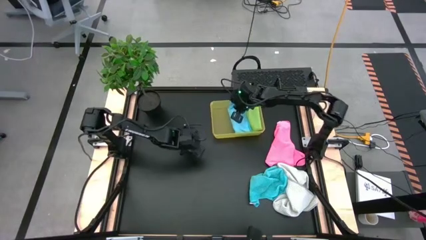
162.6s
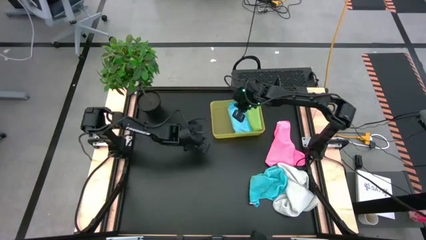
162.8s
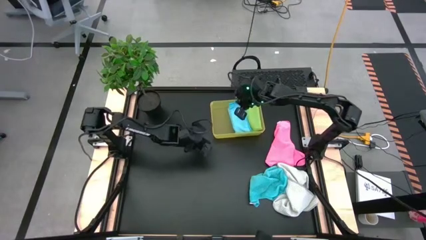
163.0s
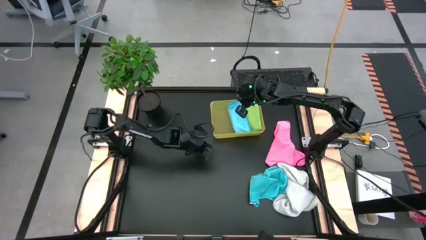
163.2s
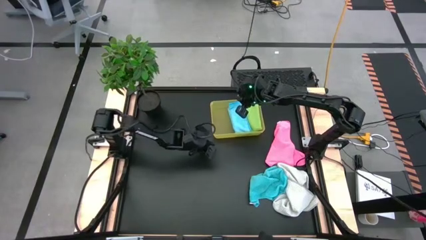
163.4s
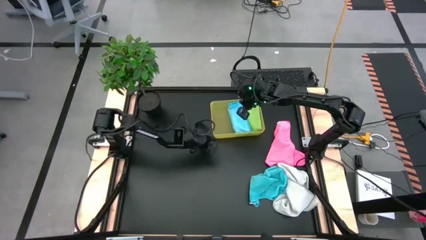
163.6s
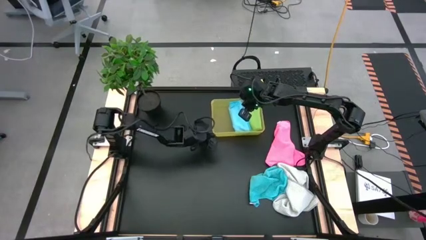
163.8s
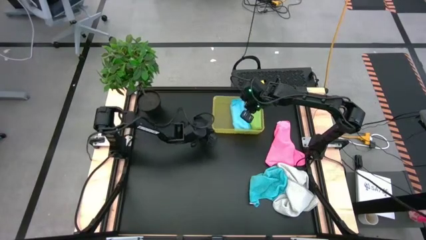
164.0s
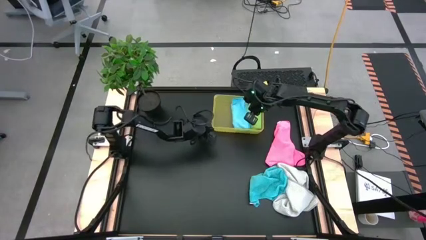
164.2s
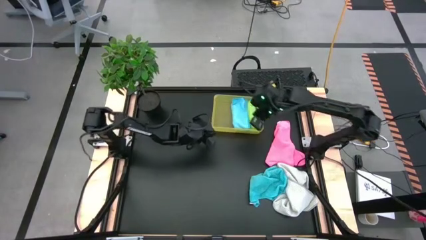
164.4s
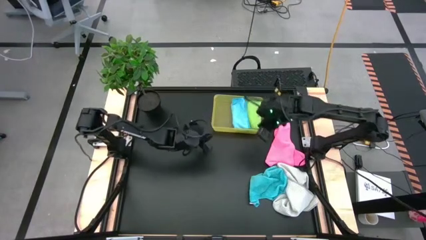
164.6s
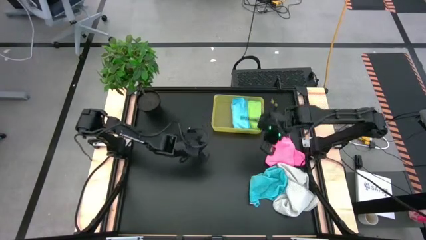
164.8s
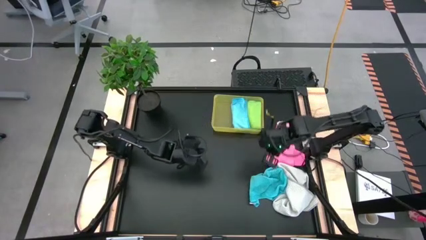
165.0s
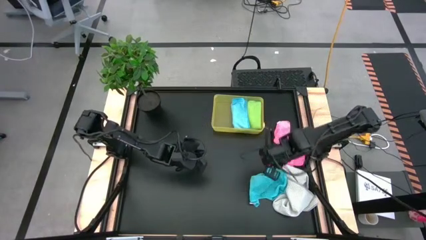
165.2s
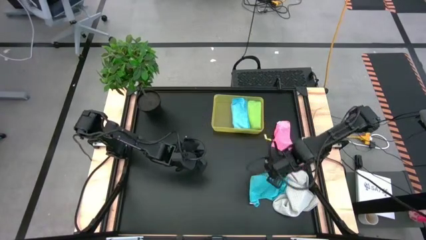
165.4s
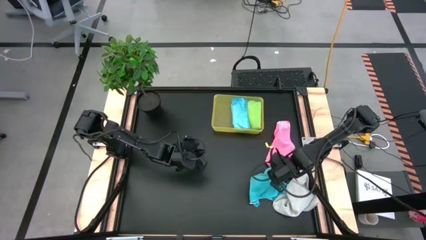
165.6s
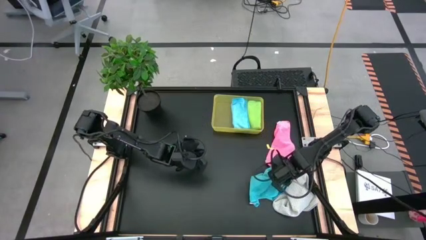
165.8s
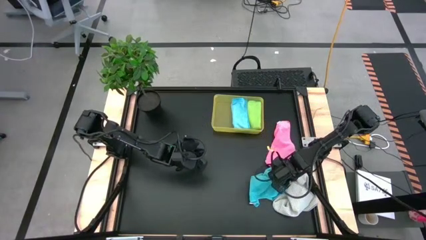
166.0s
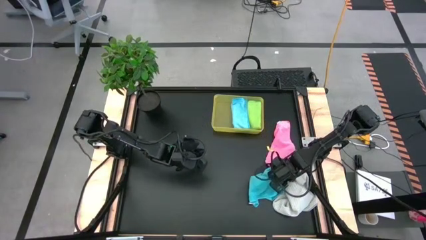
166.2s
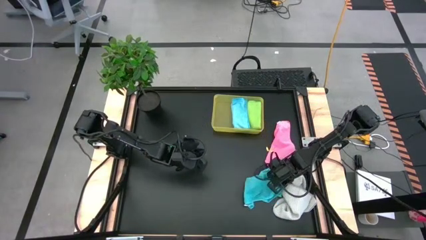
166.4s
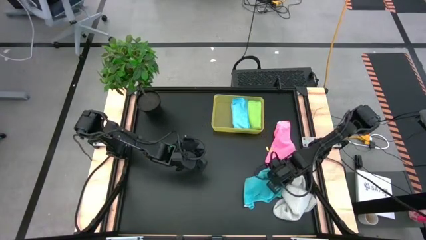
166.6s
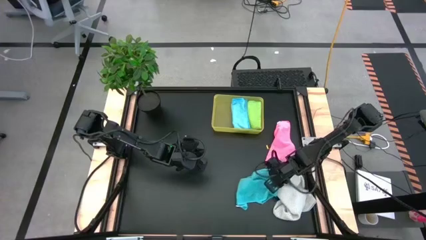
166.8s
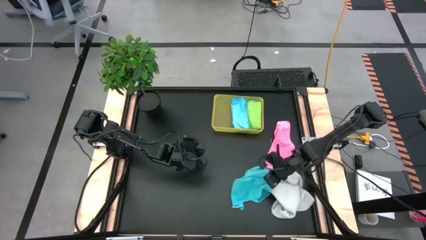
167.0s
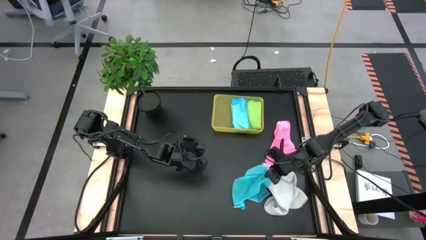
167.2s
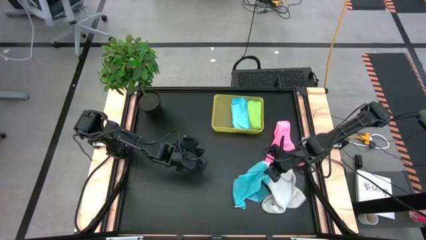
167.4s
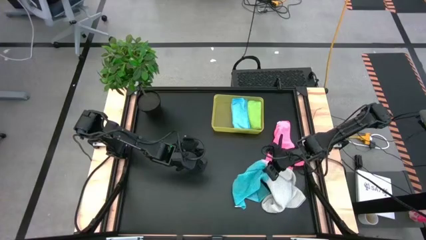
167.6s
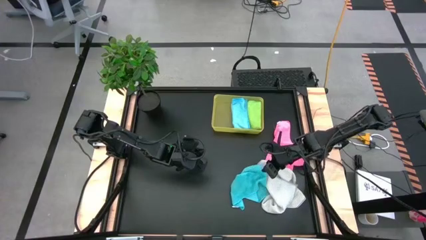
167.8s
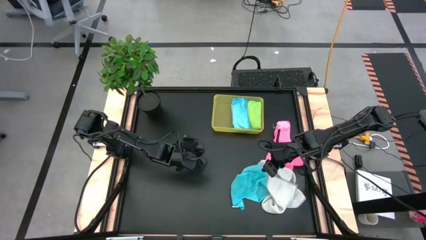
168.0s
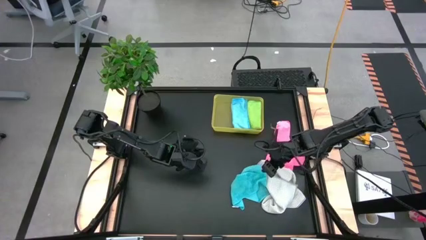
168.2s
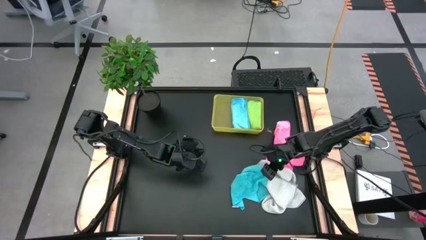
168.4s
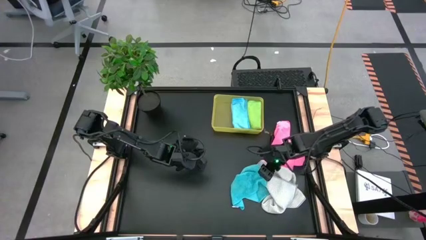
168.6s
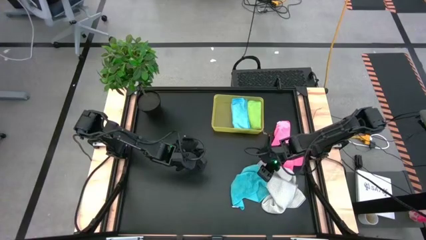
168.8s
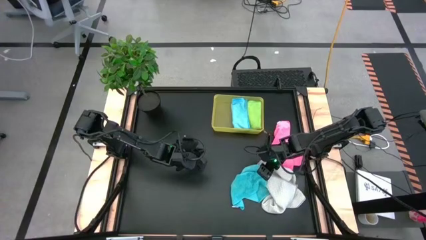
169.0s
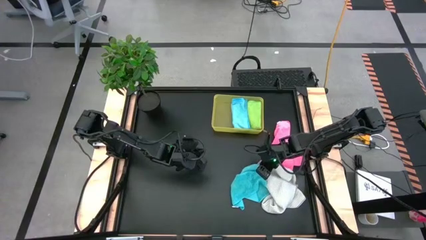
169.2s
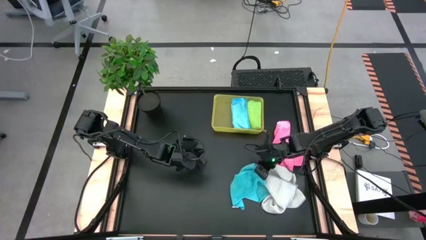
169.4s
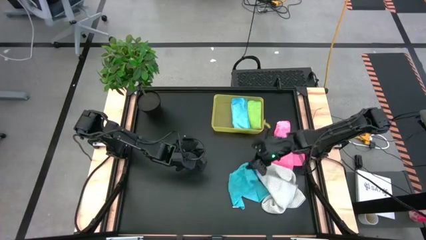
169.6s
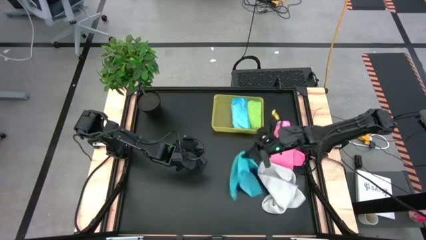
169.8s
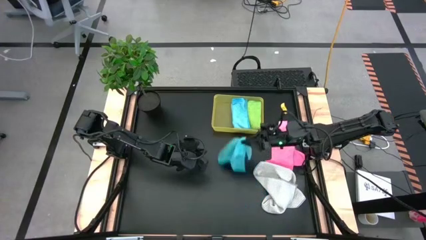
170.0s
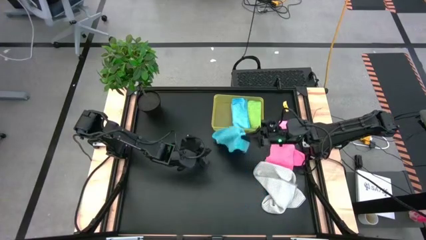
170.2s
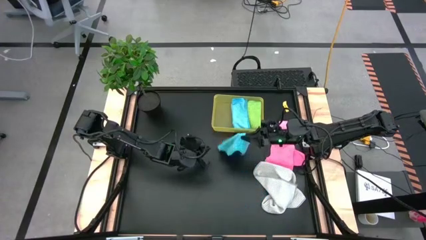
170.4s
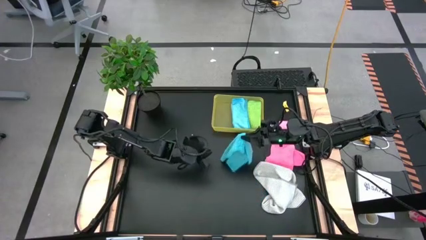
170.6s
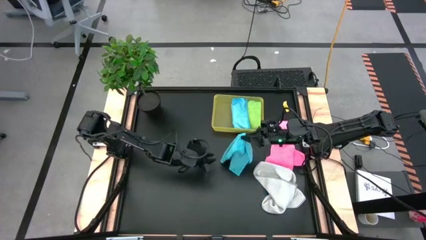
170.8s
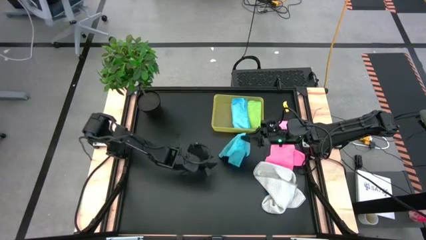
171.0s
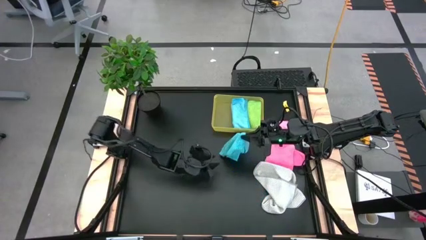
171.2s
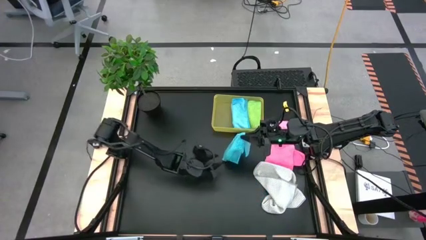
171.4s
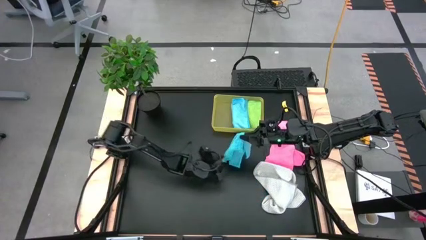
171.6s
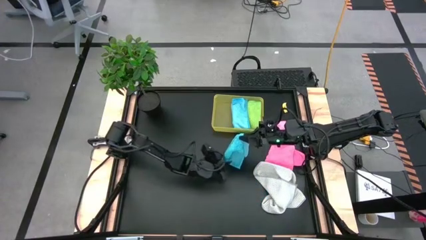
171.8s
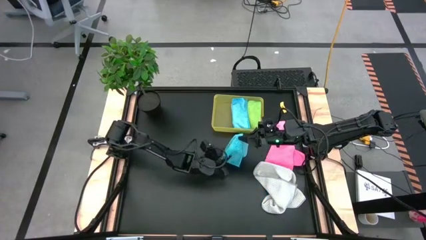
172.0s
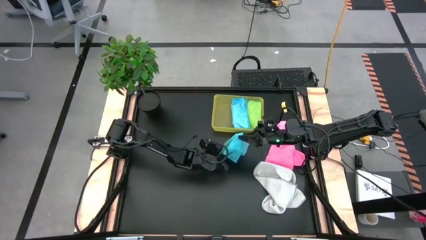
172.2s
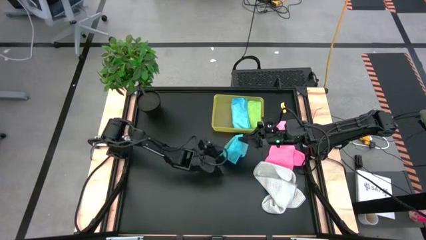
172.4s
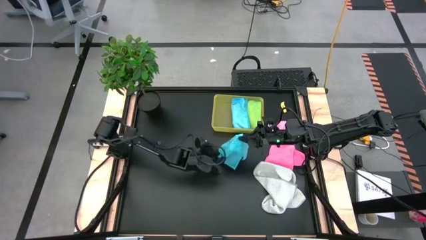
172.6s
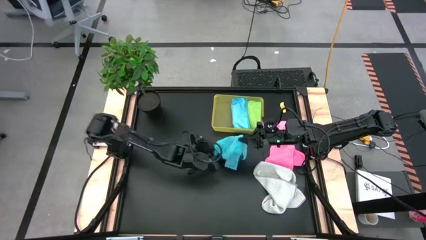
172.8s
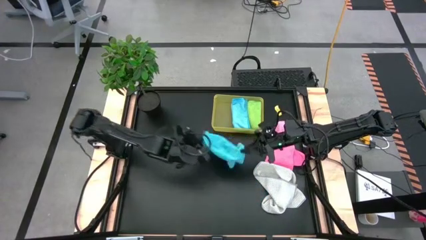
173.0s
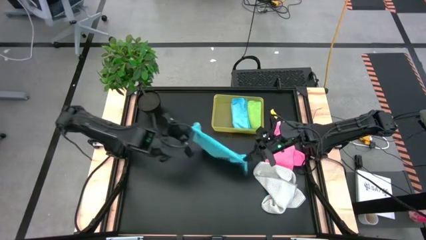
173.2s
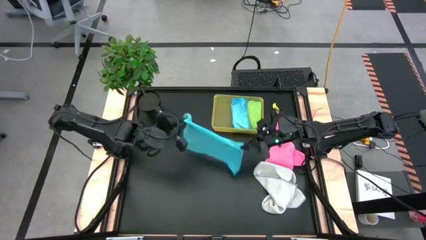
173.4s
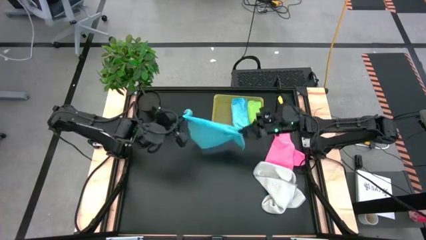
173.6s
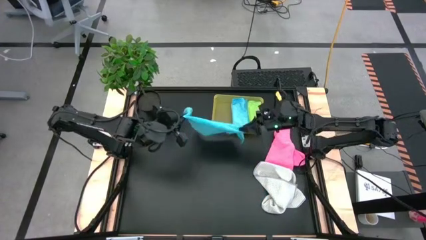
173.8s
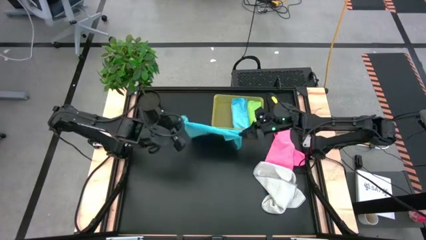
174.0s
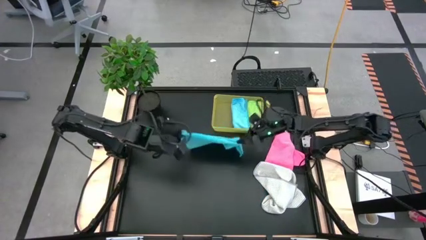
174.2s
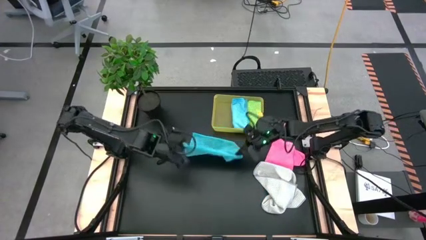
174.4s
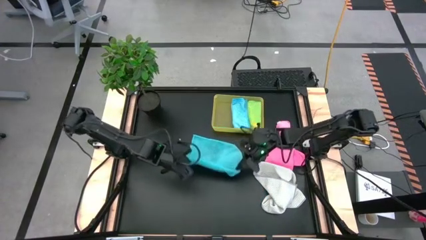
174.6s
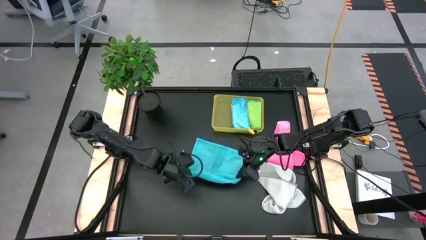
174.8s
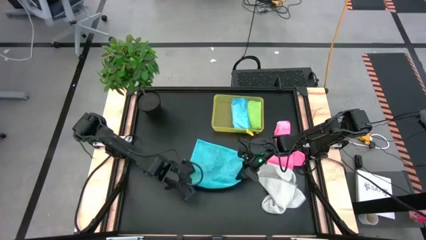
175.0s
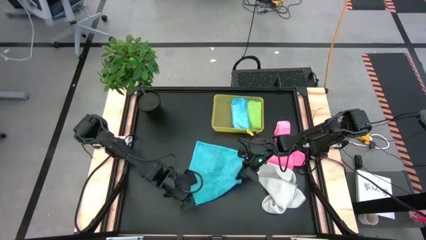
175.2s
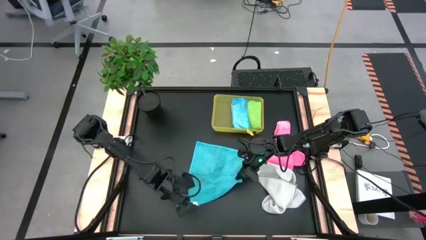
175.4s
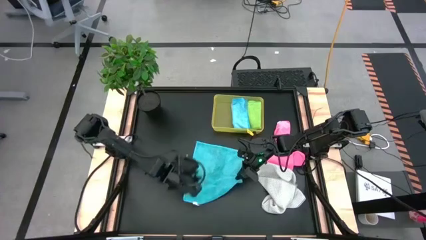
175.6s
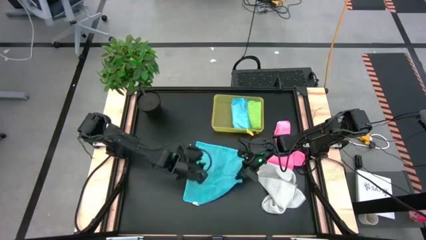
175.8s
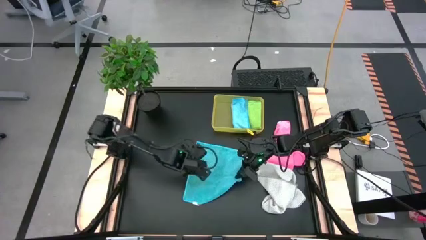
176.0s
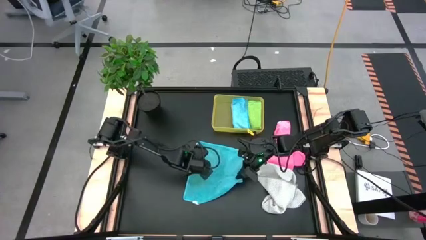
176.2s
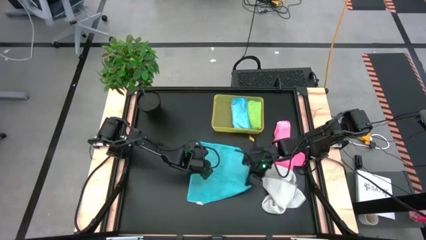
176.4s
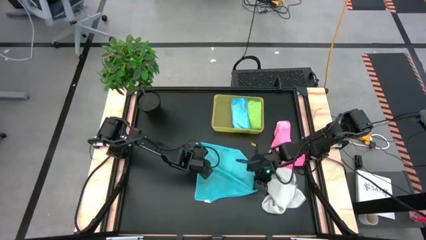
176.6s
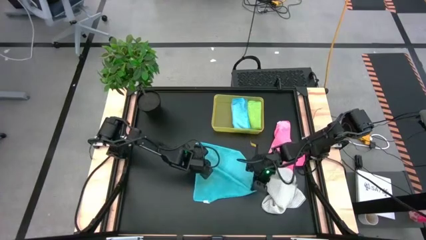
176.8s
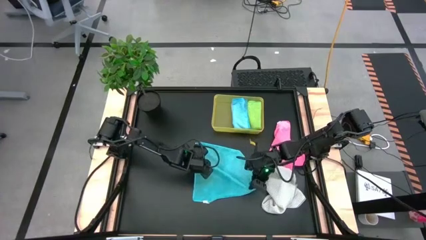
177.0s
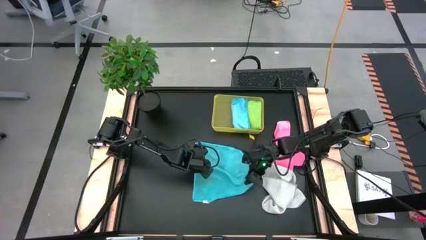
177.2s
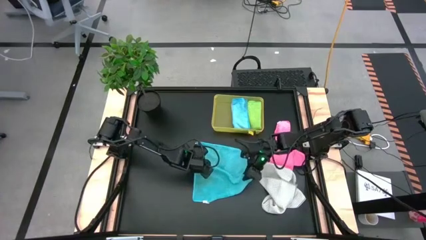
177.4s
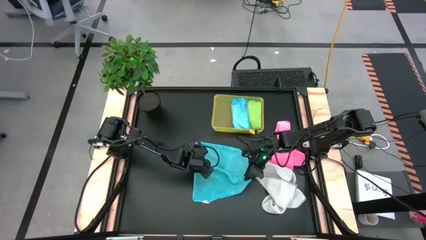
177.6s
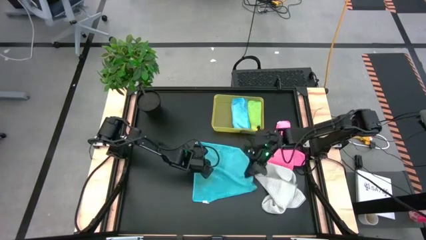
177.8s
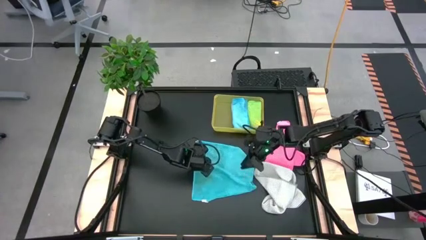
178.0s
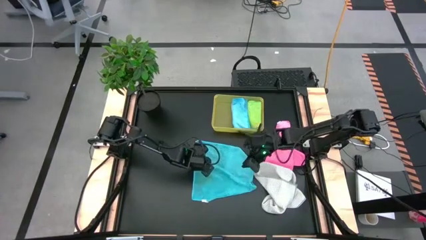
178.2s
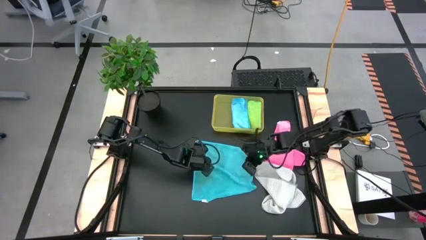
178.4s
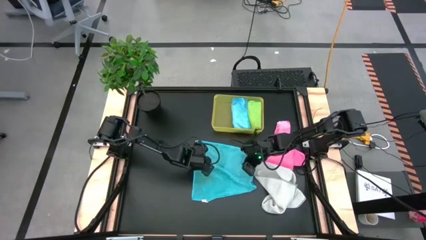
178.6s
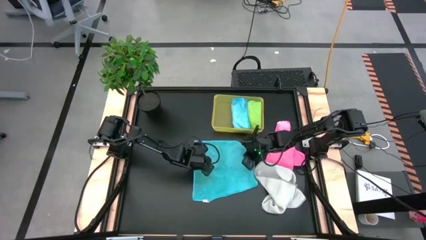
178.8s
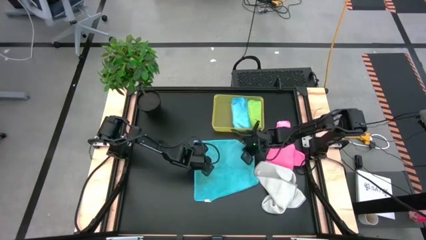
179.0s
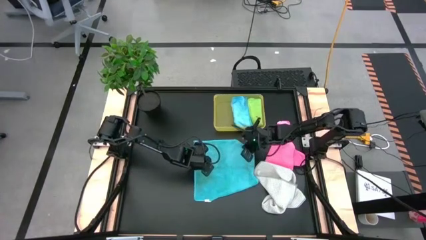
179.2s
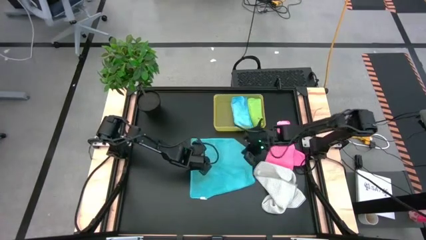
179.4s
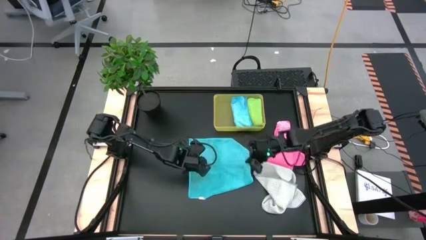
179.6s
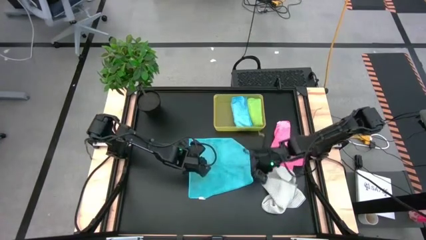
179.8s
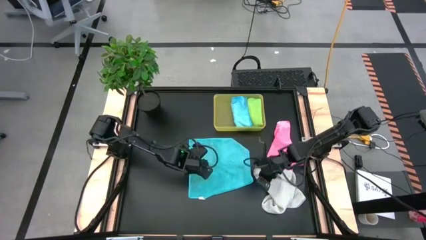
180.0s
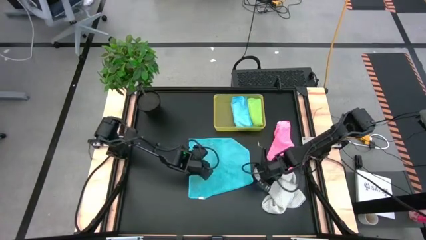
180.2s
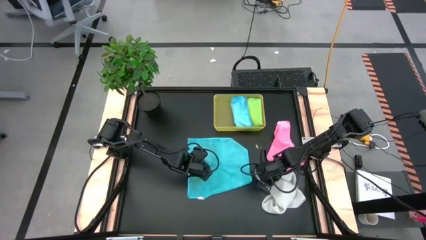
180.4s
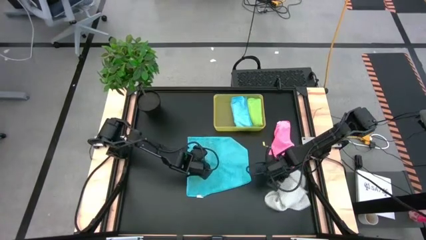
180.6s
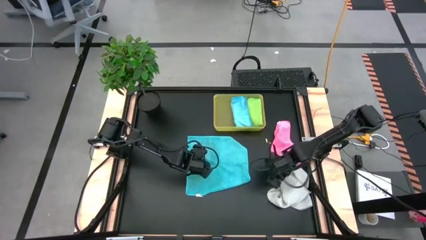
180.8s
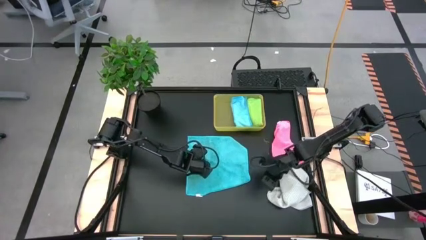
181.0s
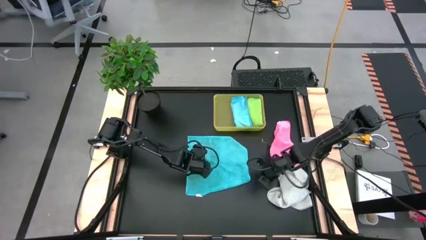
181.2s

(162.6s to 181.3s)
Task: Fold microfiber towels
Fold the blue microfiber cloth
